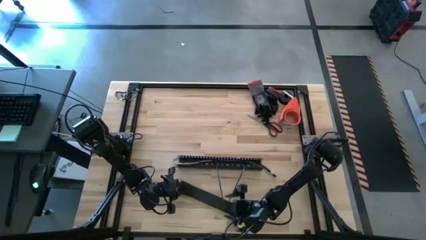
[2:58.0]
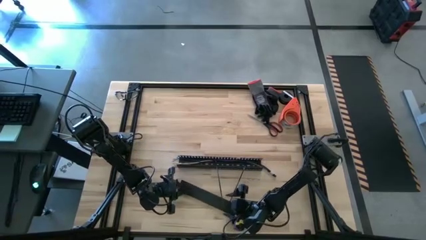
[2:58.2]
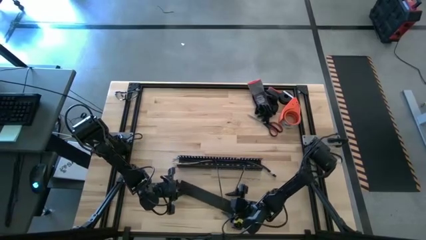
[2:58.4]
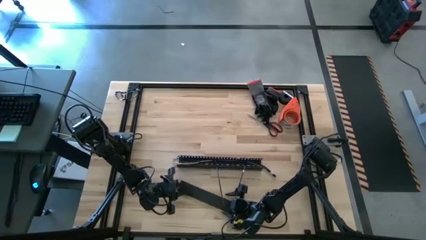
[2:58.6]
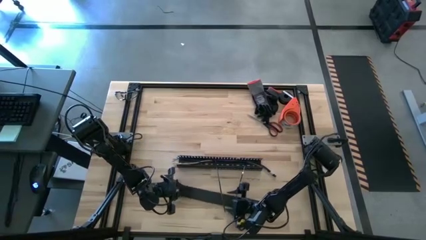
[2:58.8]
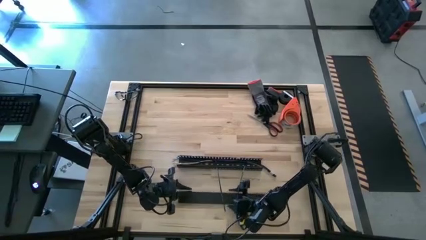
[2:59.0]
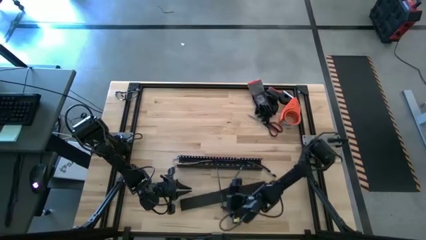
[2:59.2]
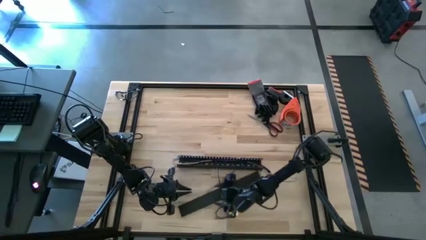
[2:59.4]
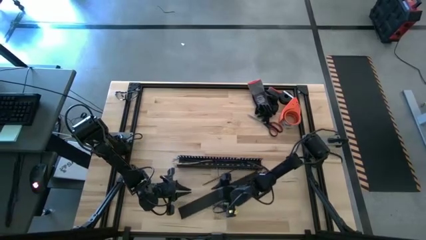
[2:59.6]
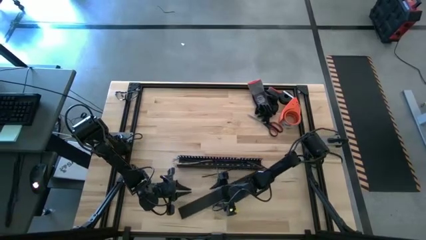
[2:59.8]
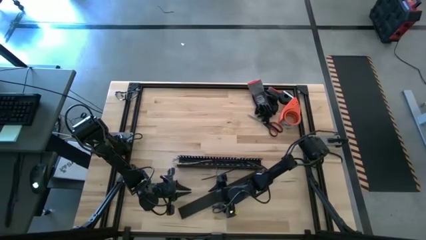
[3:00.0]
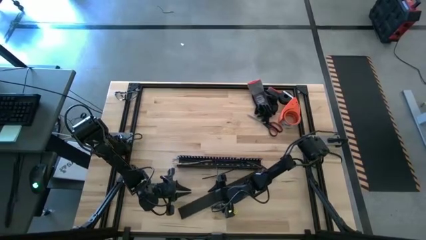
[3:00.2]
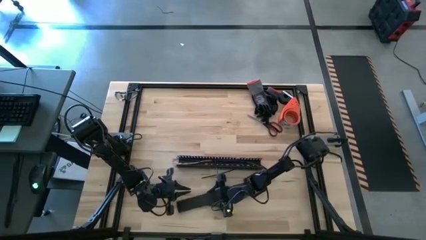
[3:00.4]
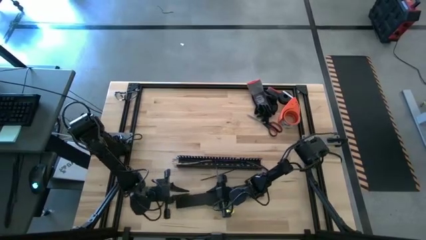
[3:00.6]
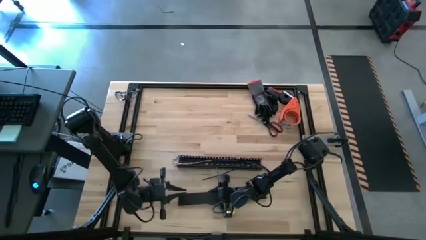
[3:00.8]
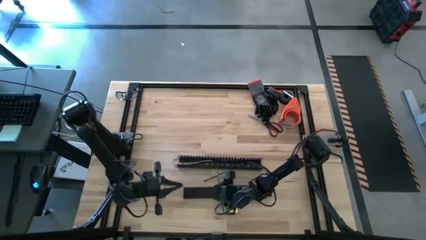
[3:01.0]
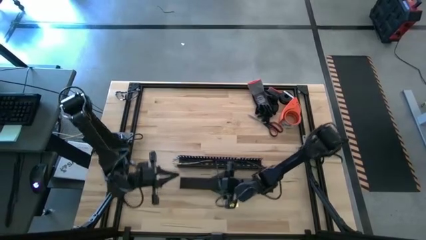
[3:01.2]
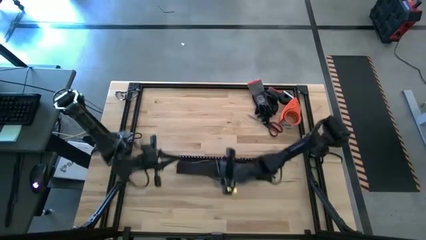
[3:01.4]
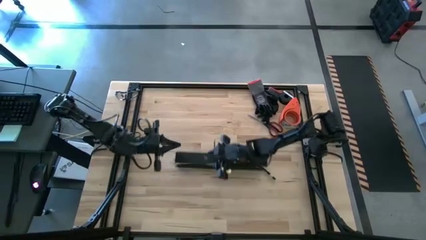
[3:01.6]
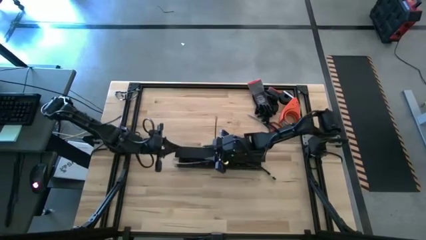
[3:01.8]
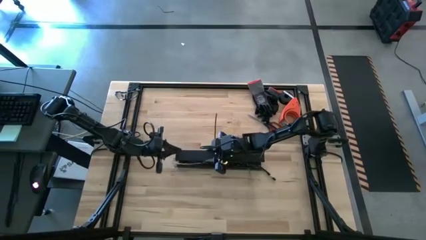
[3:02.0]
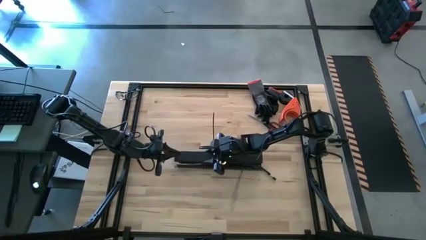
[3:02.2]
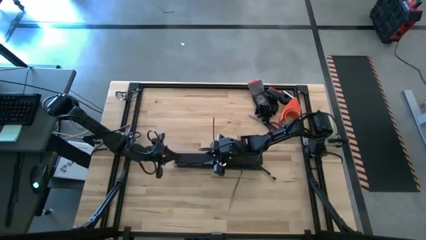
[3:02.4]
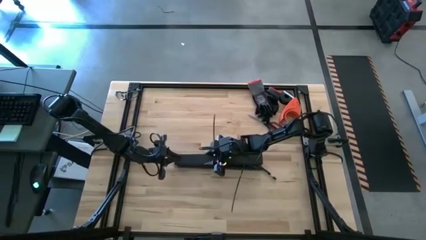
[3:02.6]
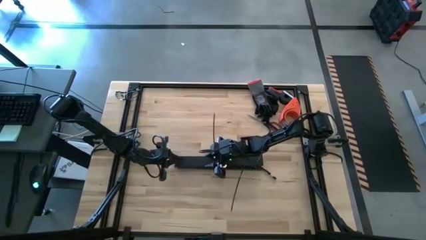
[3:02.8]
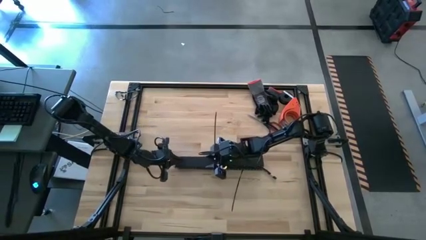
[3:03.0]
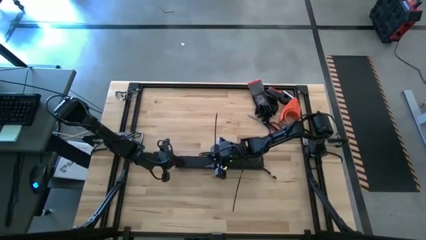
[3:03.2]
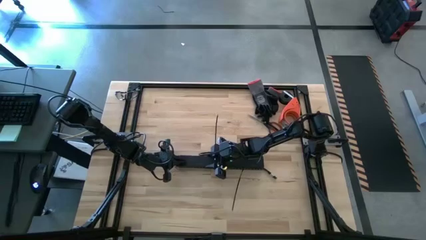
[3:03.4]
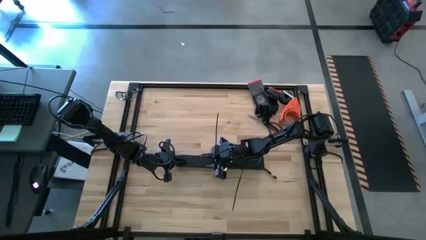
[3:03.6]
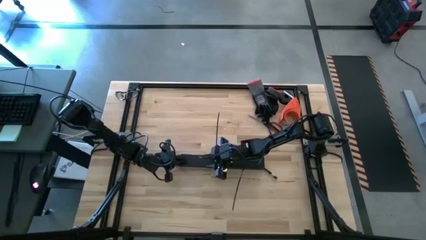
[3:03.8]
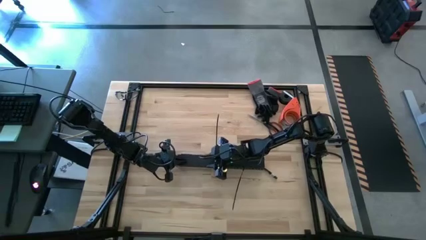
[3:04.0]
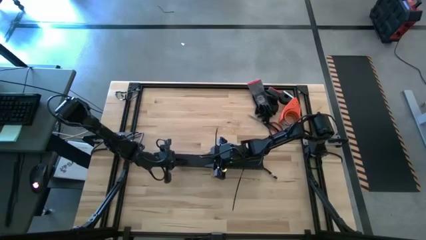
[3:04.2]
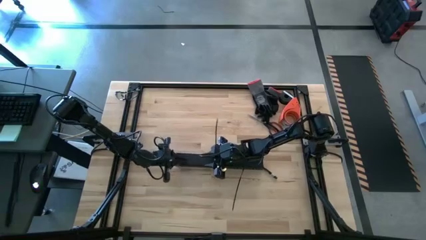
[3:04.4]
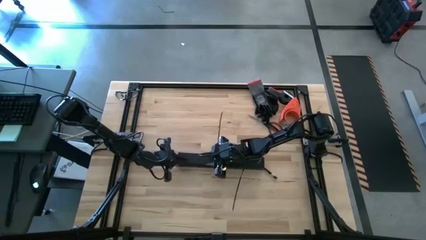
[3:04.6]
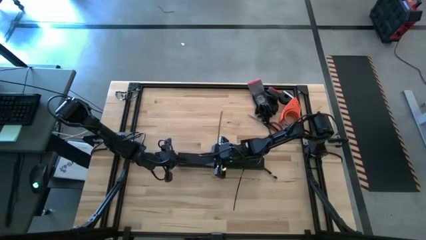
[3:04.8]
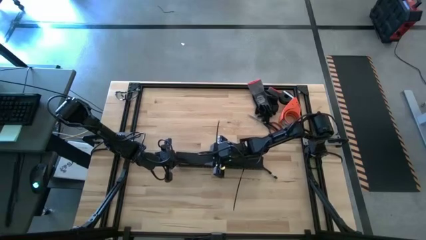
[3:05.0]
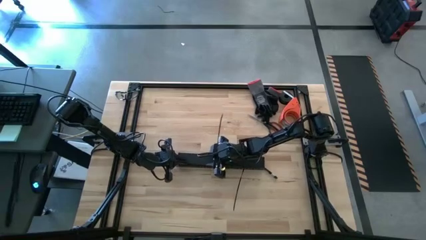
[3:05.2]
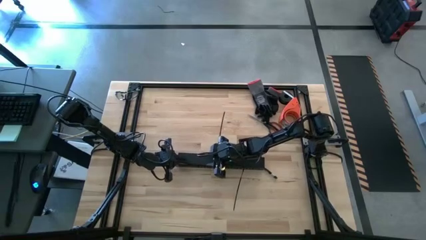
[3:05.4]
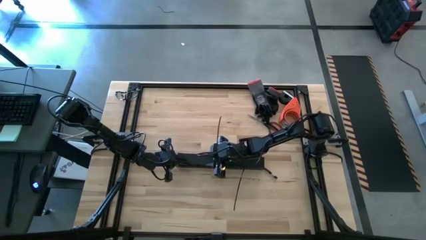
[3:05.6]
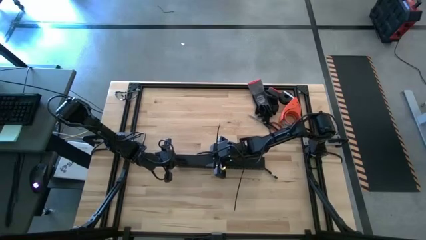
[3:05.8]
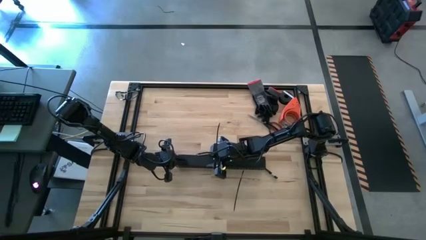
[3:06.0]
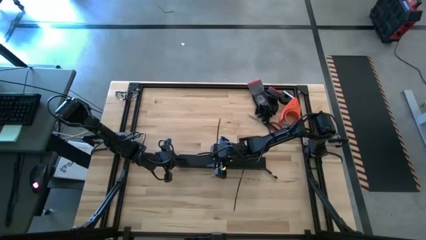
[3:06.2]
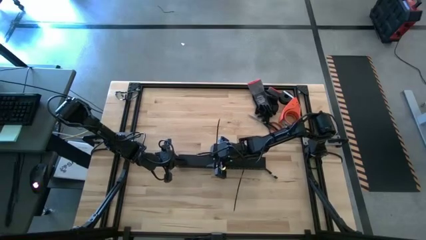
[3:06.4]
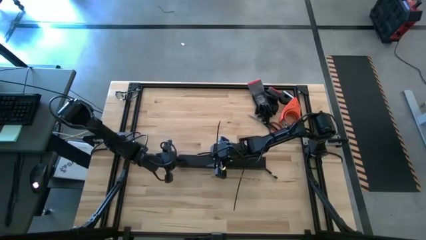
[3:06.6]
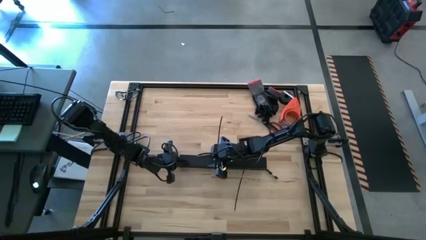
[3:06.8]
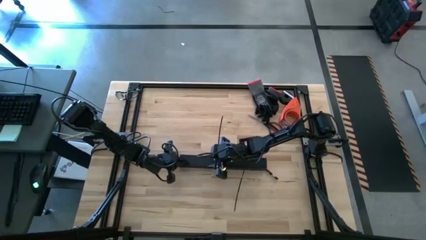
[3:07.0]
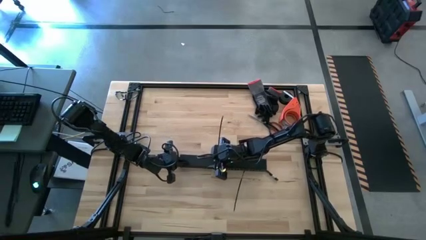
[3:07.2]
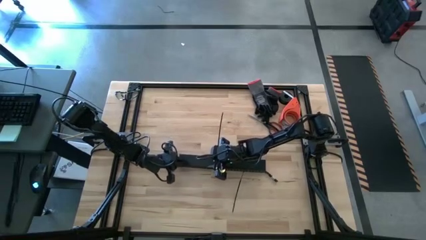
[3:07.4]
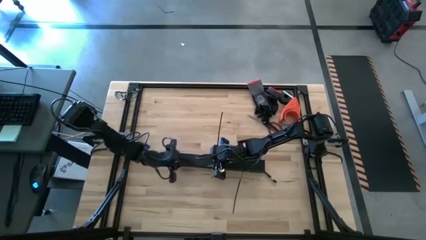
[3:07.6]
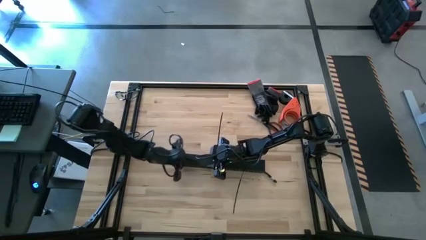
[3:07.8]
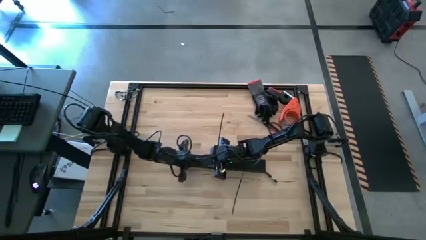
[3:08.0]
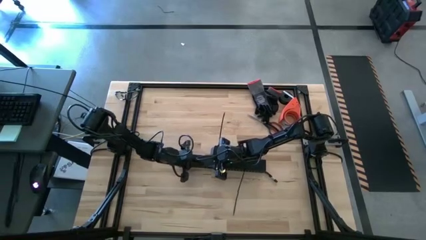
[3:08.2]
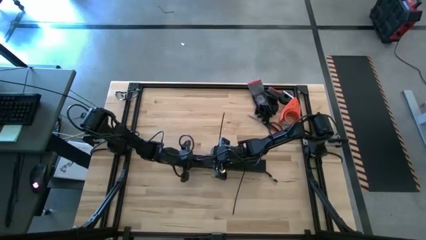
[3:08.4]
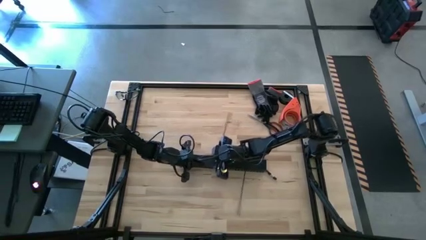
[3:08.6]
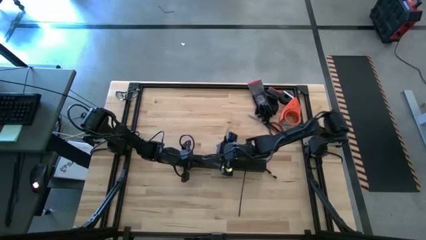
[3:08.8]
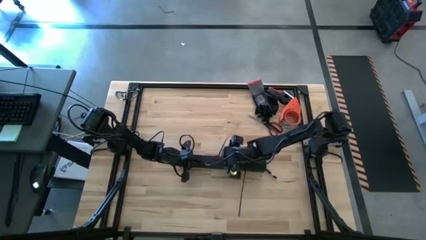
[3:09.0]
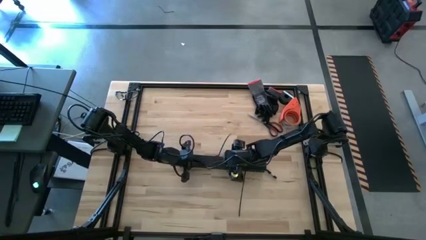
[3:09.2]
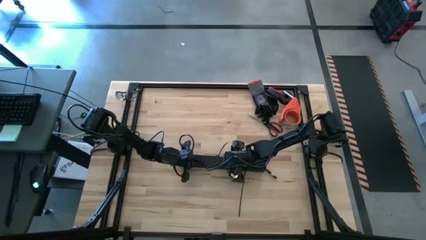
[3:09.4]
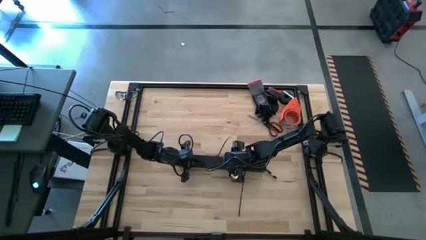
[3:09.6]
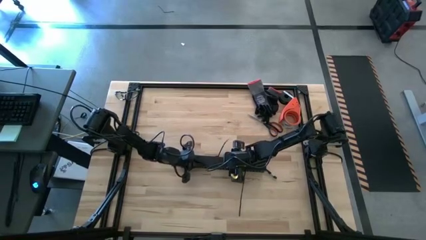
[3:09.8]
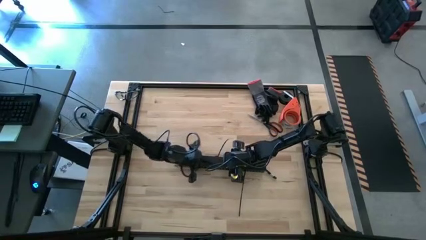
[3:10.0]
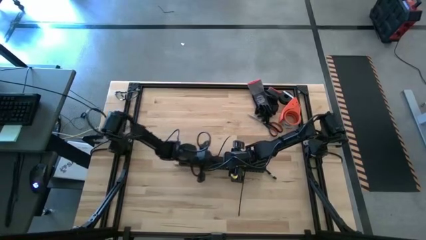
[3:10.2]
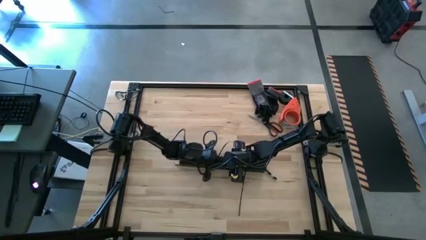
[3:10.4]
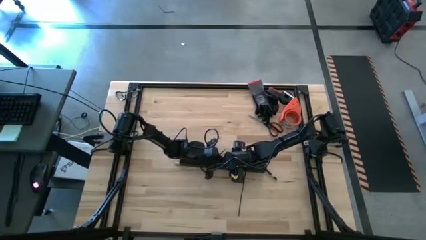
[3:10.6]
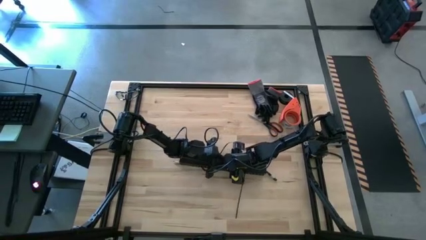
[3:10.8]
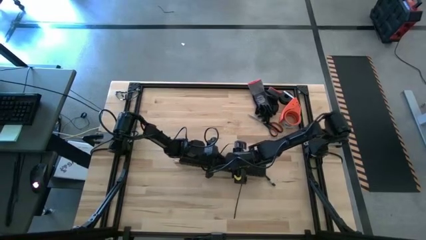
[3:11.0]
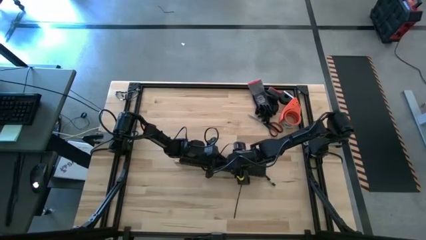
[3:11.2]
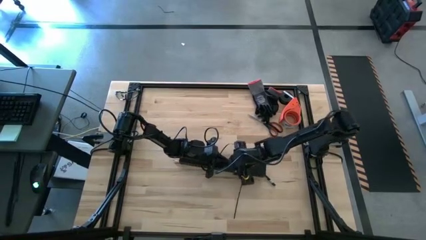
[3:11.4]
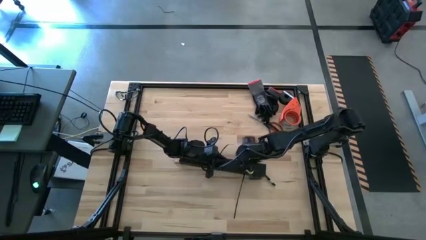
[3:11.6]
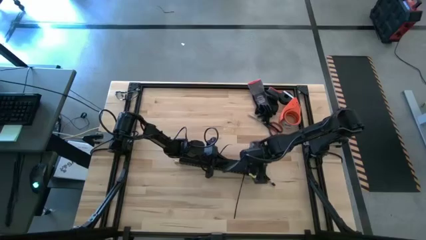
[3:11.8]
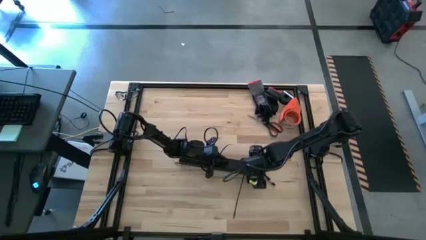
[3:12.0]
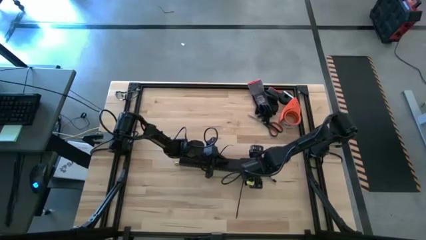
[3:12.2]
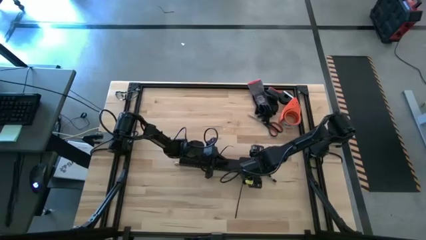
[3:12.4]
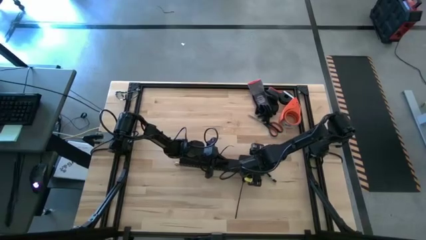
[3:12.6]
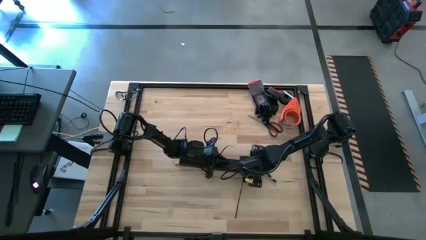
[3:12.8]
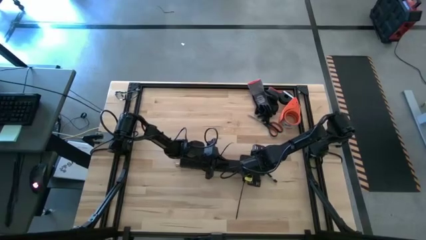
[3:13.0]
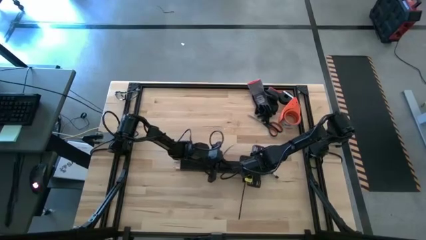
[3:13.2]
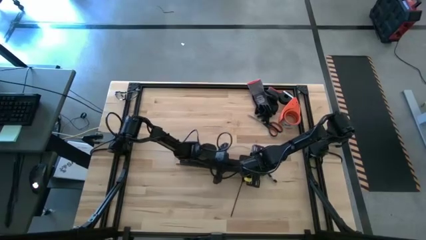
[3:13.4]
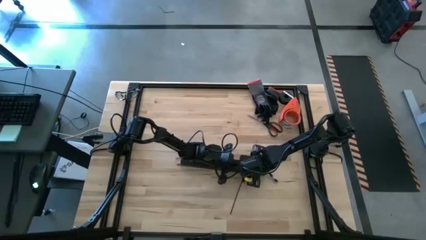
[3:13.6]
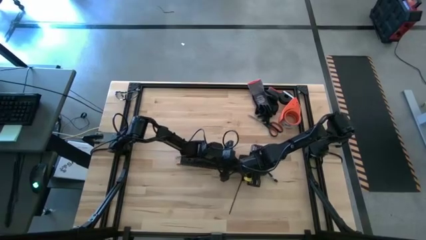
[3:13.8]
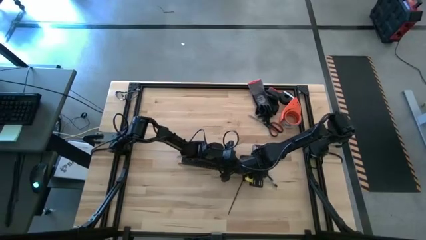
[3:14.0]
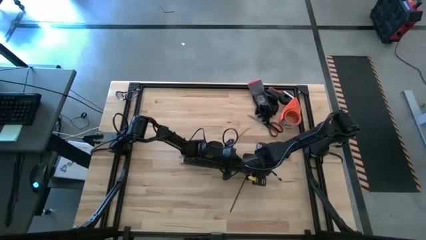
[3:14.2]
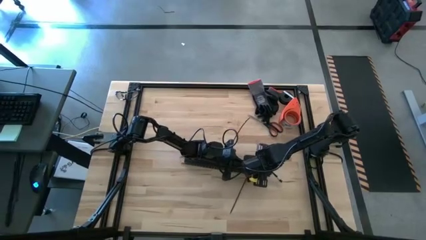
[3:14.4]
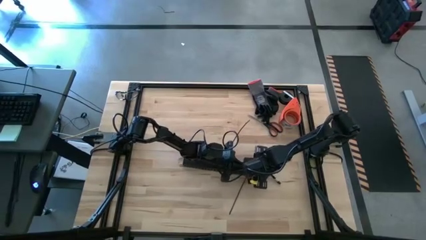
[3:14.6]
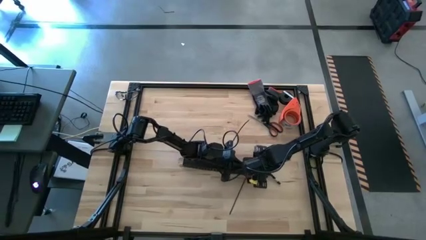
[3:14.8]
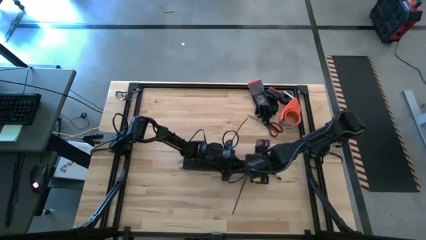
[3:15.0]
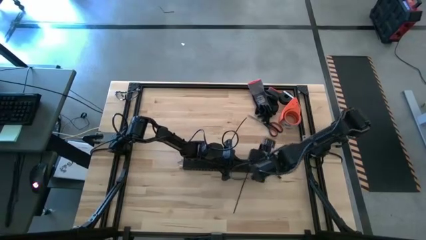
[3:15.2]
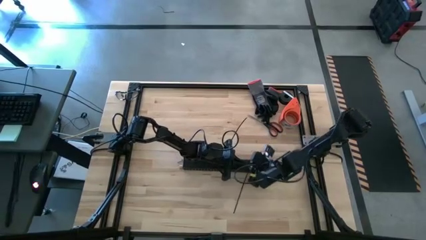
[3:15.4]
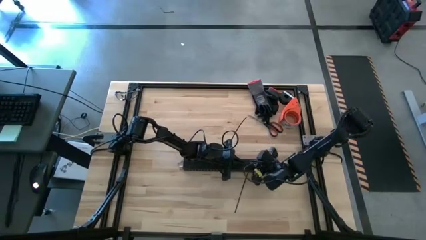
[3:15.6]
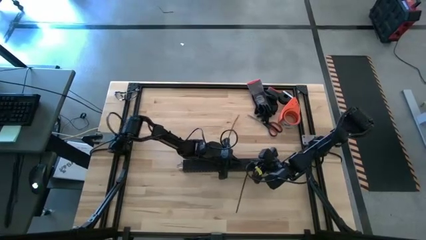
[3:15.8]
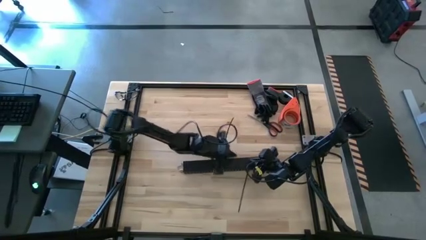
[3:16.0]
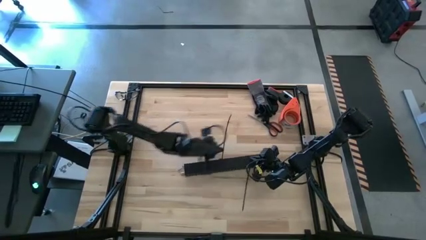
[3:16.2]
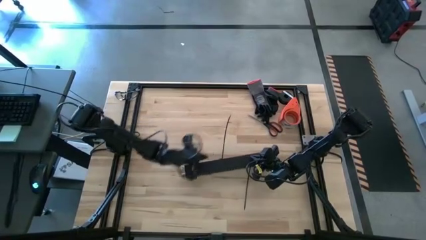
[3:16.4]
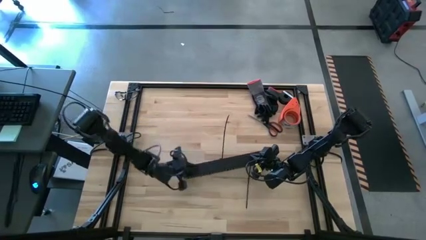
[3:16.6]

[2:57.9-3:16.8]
Task: Ziptie cables
Close the black cable duct cover
